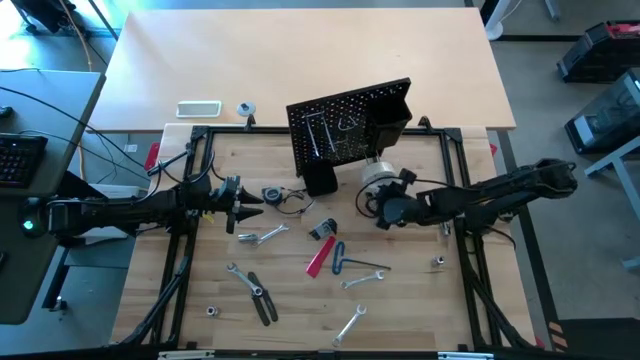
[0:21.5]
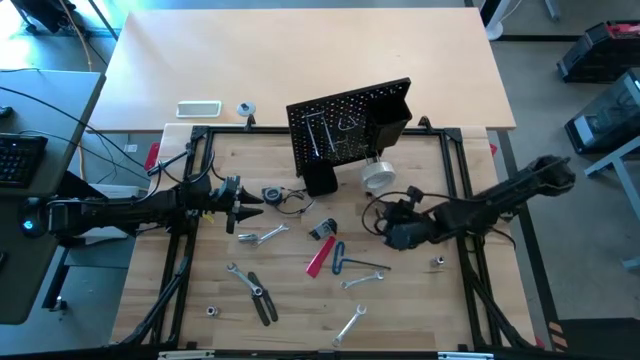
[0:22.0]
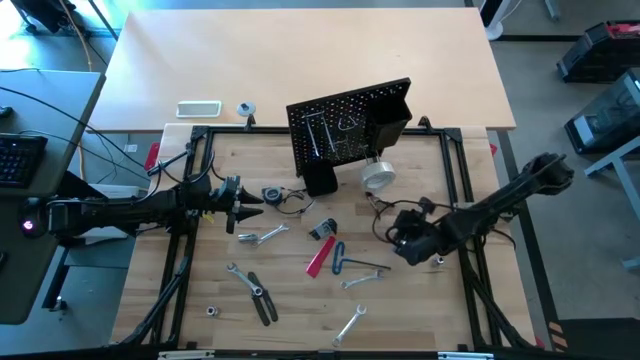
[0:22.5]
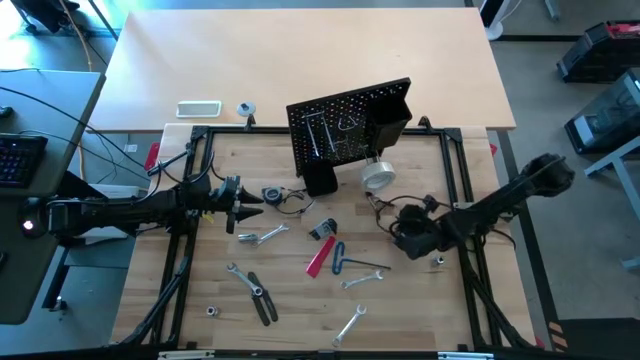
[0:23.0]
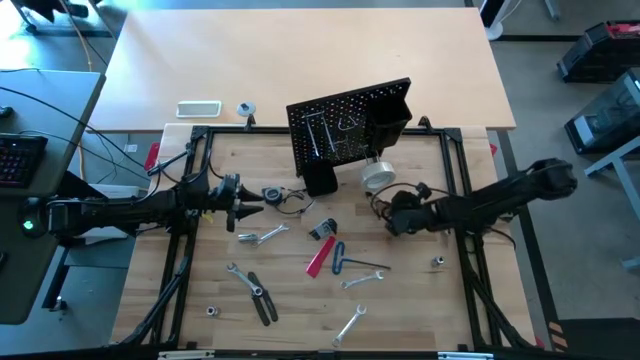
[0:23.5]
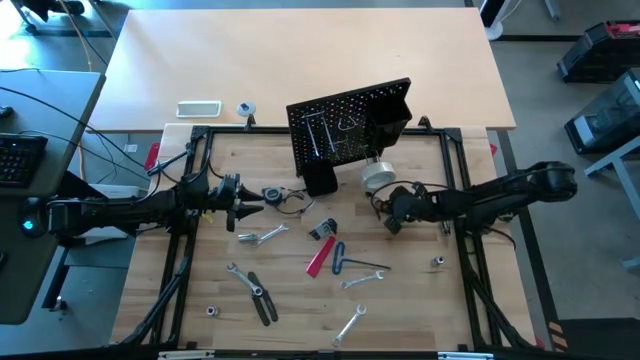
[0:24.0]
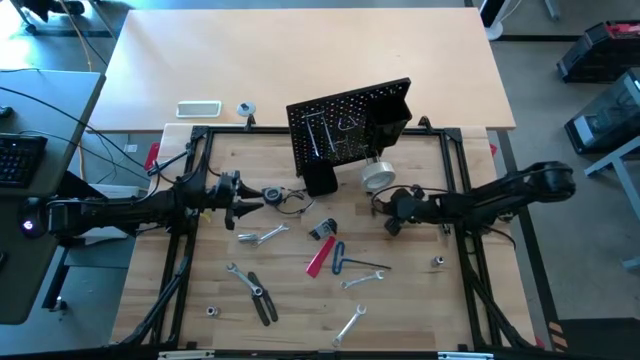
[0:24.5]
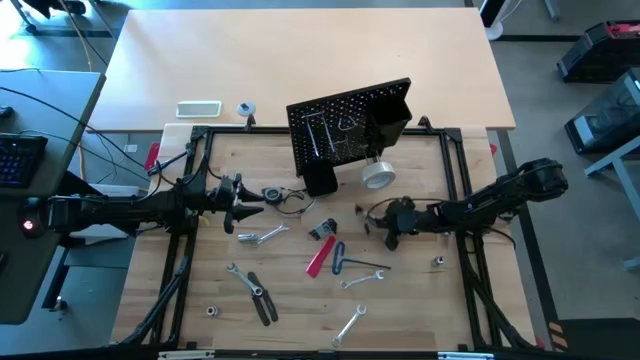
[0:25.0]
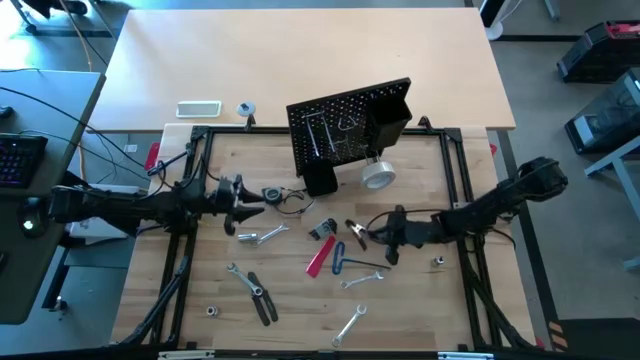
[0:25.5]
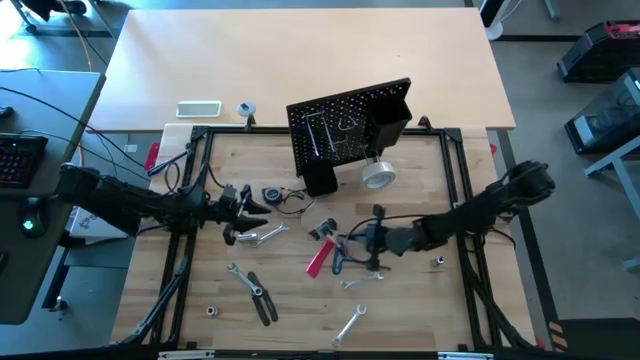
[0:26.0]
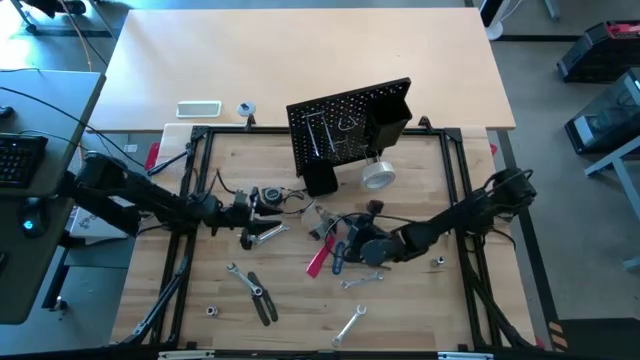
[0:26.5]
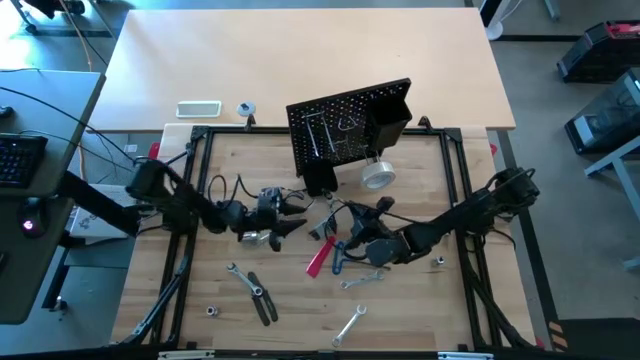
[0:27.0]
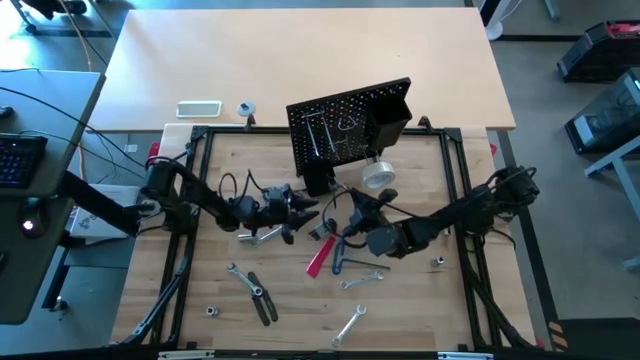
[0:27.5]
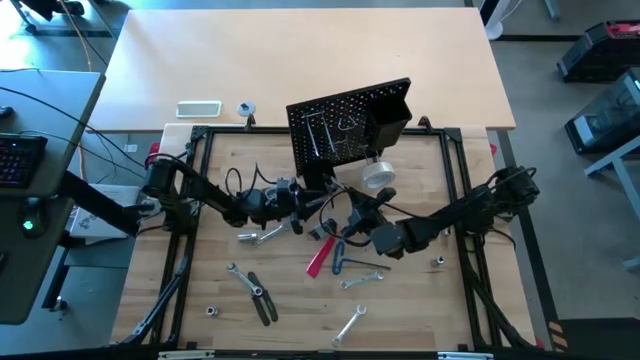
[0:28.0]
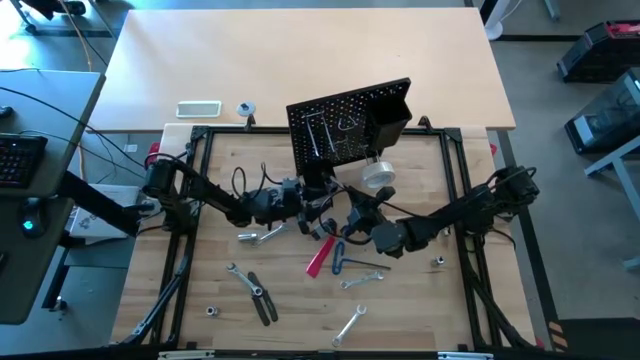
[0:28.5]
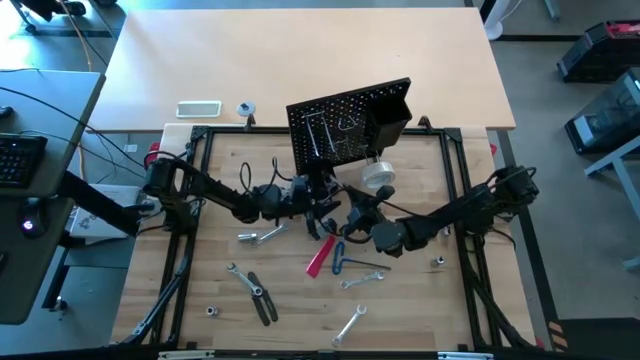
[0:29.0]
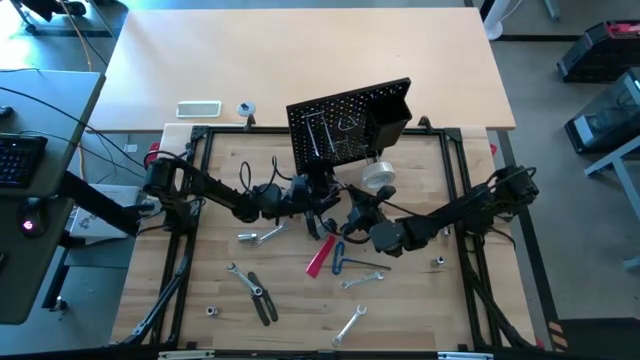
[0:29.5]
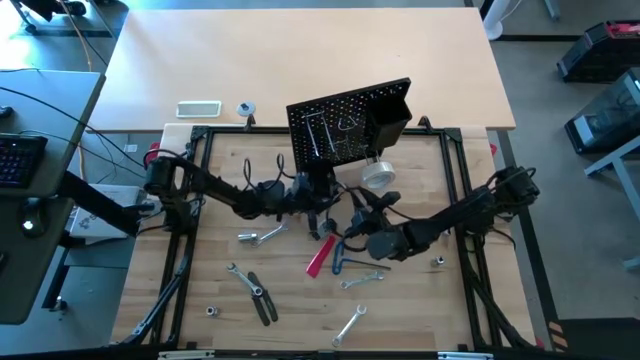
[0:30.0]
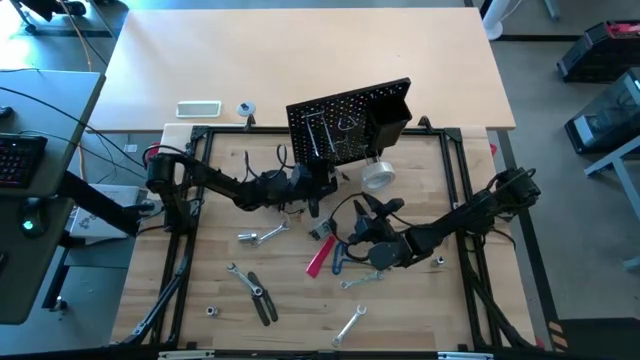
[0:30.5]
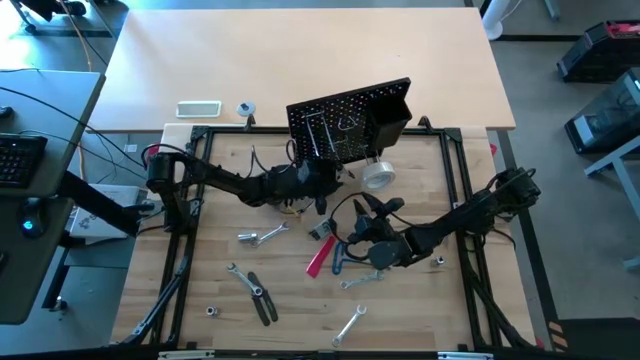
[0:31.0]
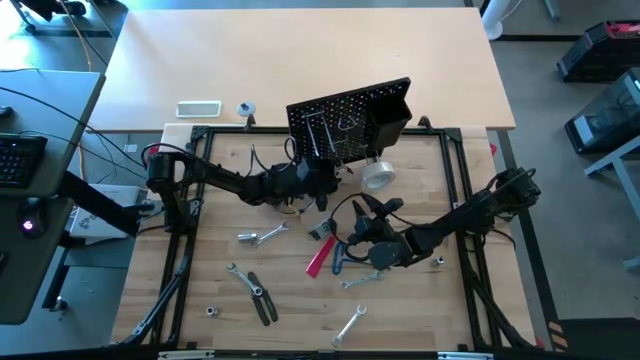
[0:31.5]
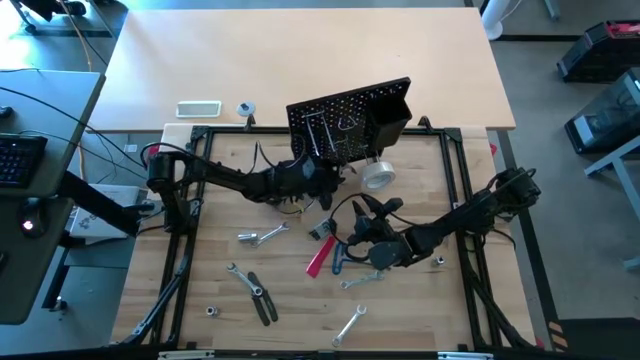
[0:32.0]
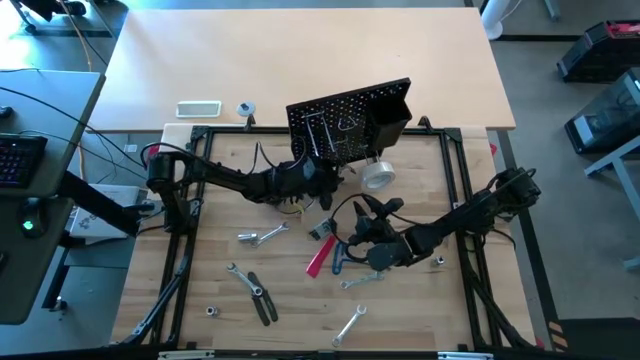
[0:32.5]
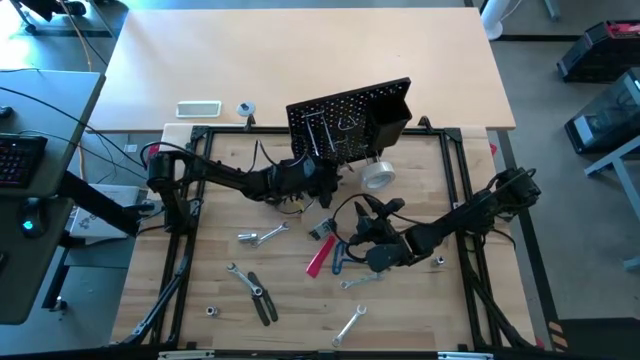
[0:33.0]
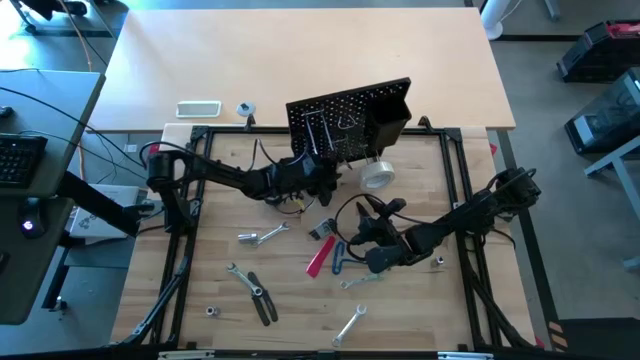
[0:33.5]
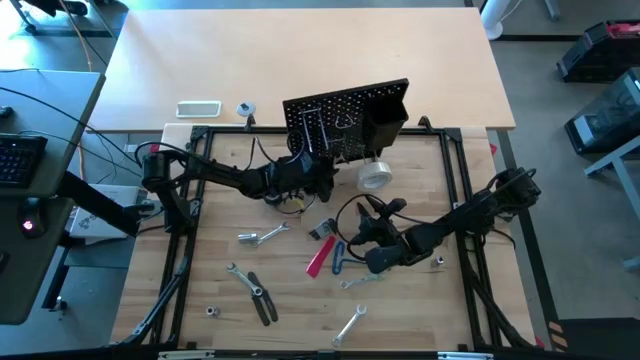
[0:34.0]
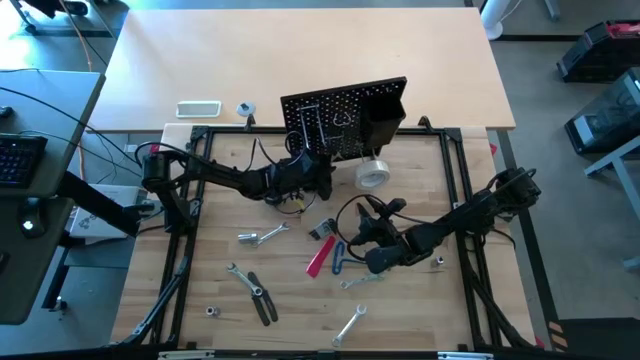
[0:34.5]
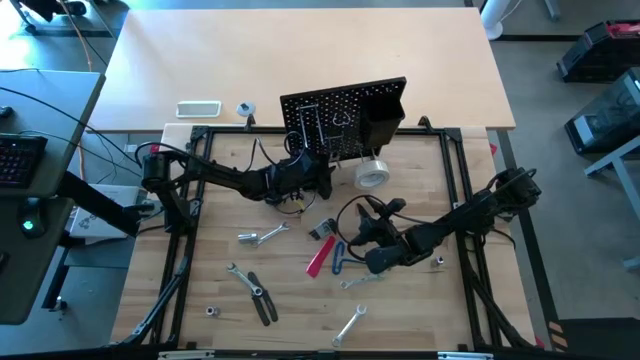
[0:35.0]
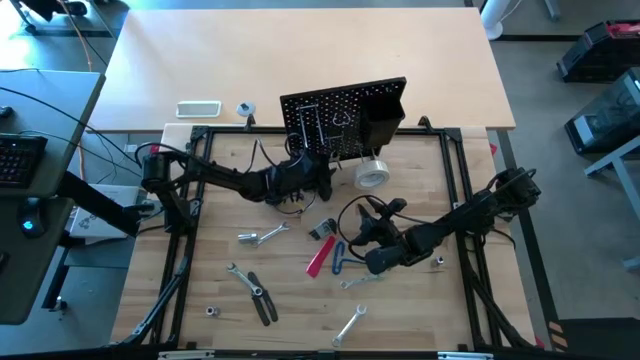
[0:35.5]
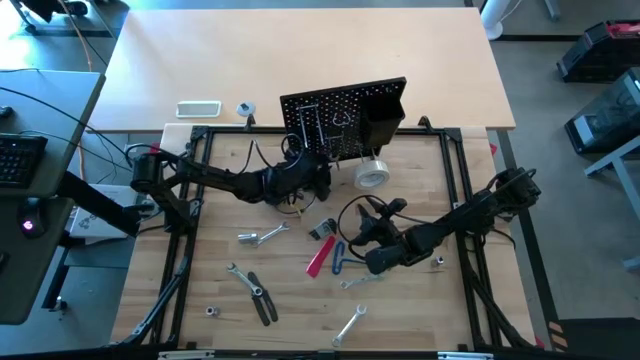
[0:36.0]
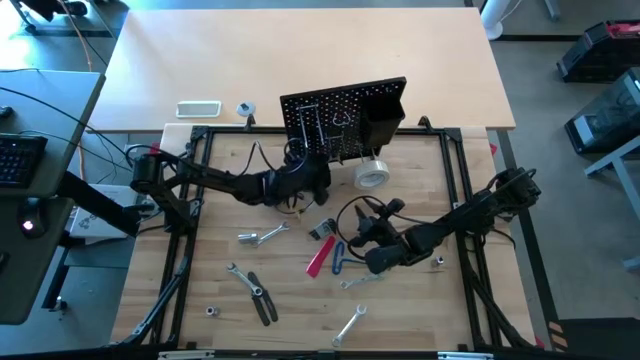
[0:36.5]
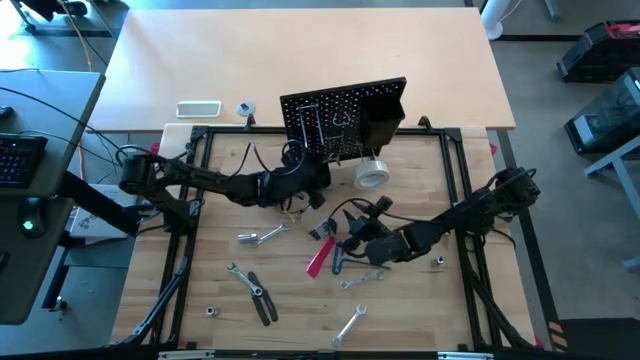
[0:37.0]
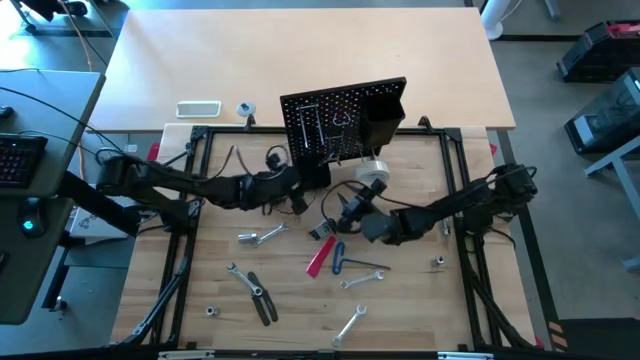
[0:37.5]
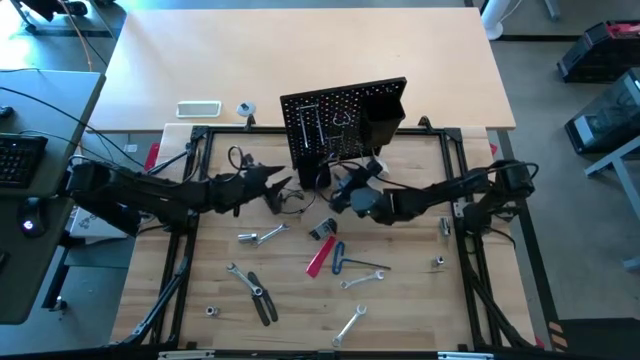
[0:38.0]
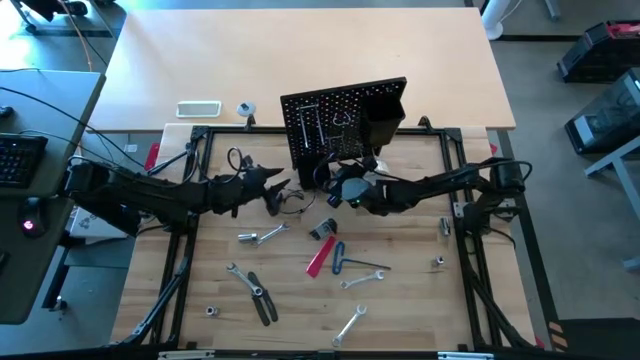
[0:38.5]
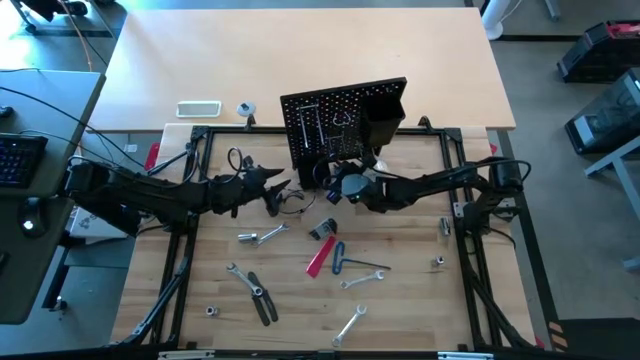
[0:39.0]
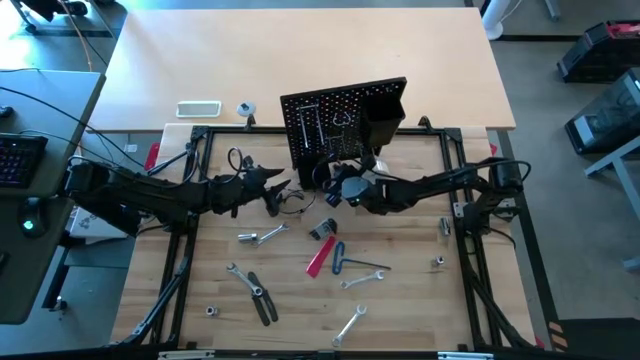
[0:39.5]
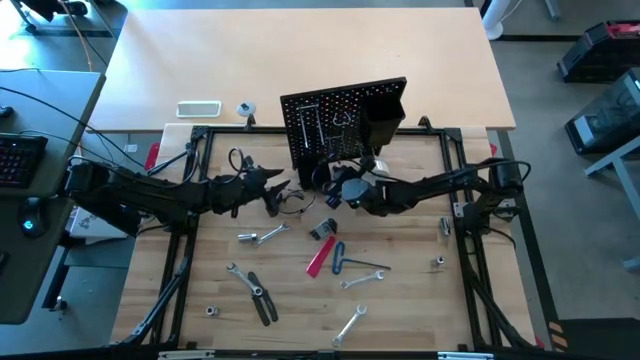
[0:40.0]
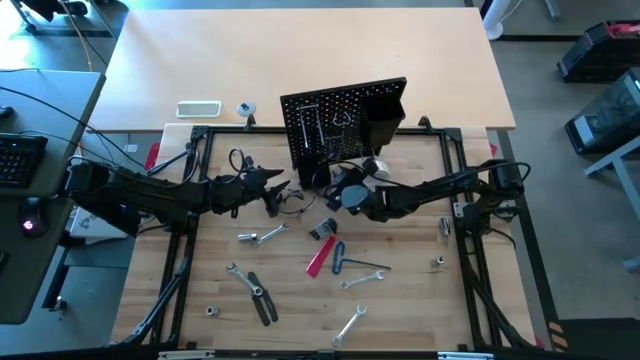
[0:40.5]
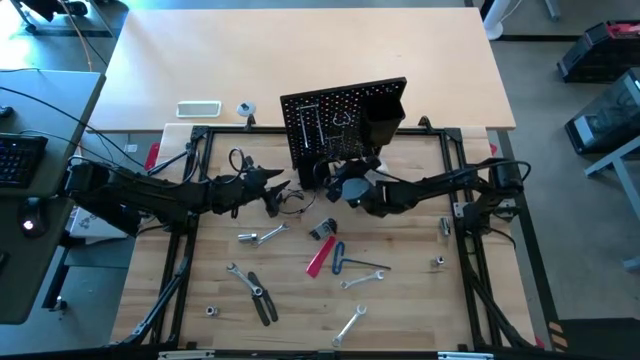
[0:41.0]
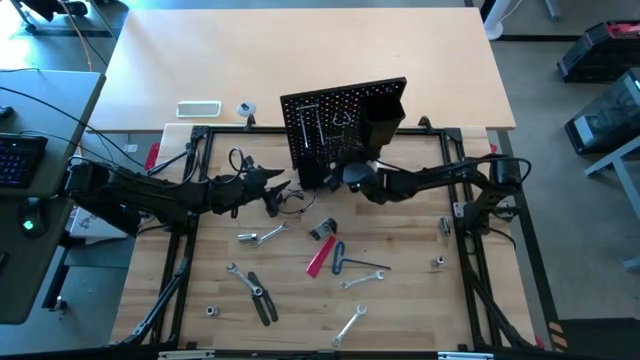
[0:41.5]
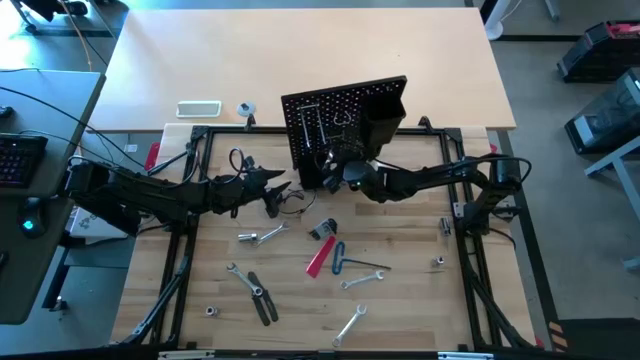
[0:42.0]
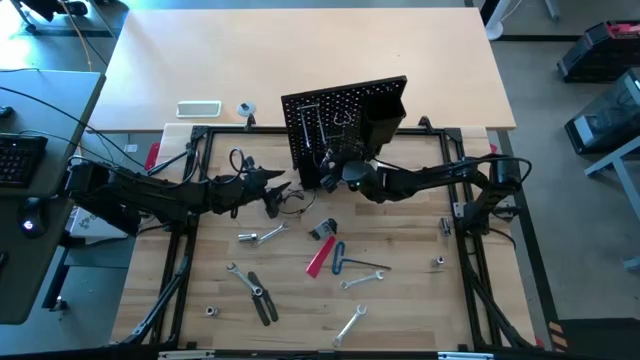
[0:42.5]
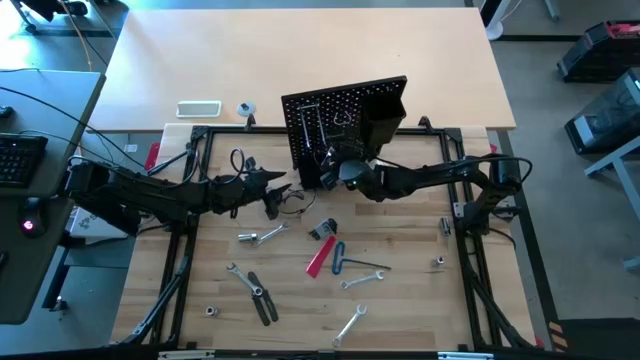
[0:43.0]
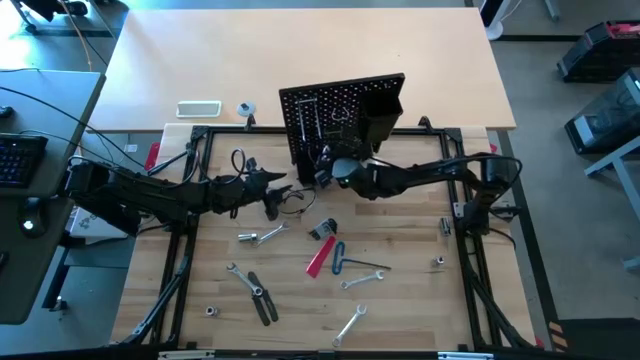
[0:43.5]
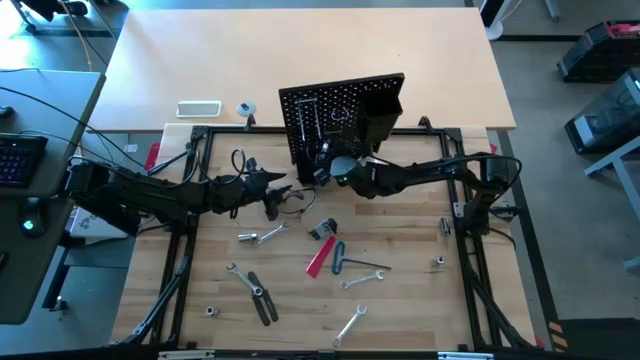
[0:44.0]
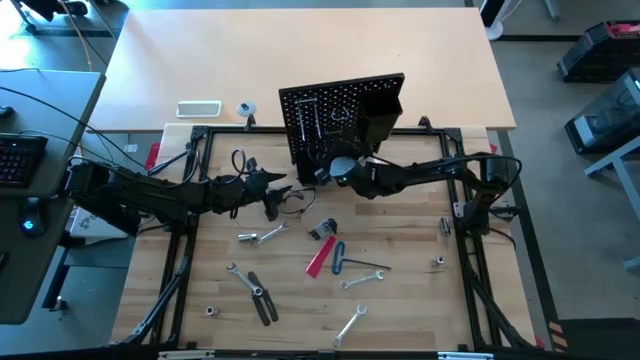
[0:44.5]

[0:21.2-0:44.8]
Task: Hang tools onto peg board
Hang the black spring clamp on the pegboard
